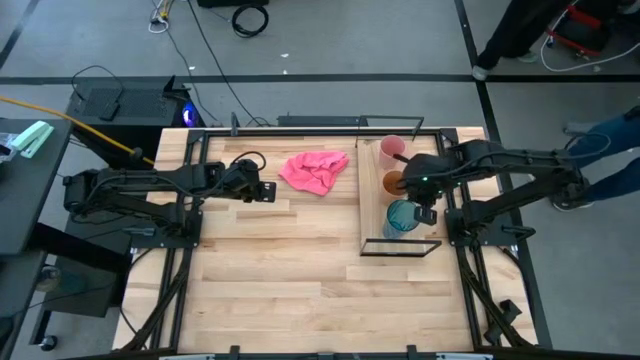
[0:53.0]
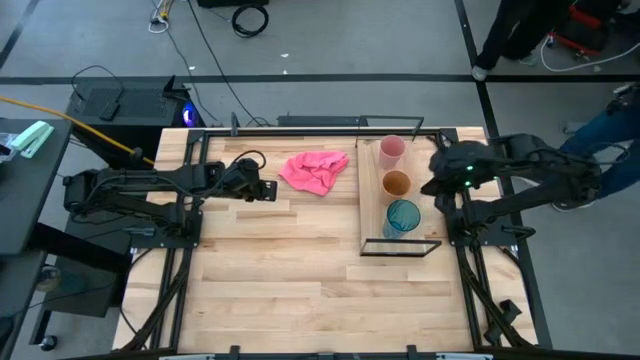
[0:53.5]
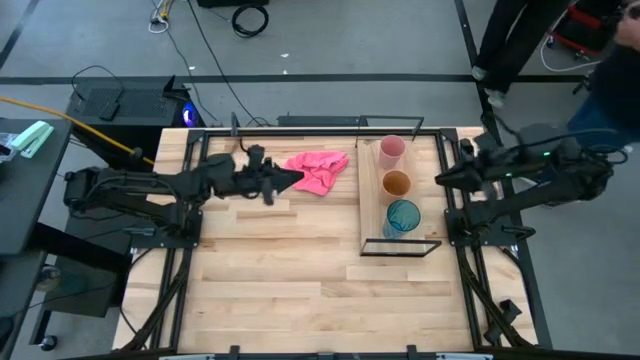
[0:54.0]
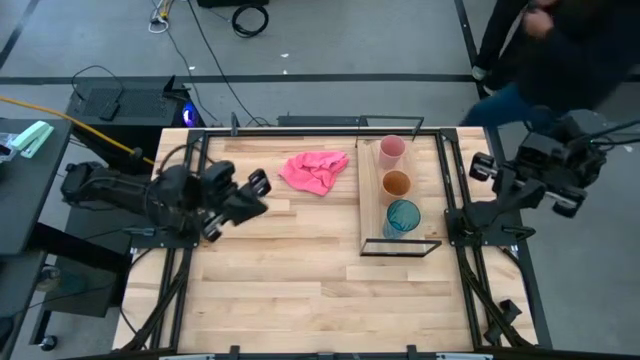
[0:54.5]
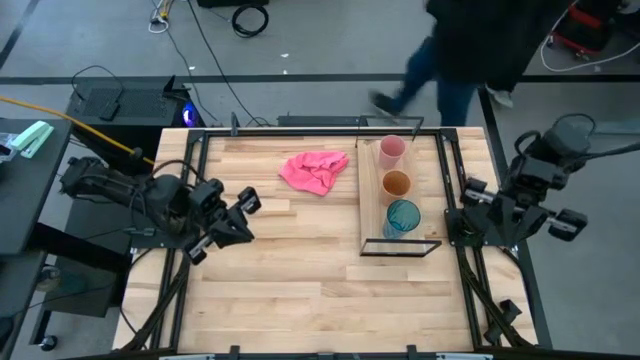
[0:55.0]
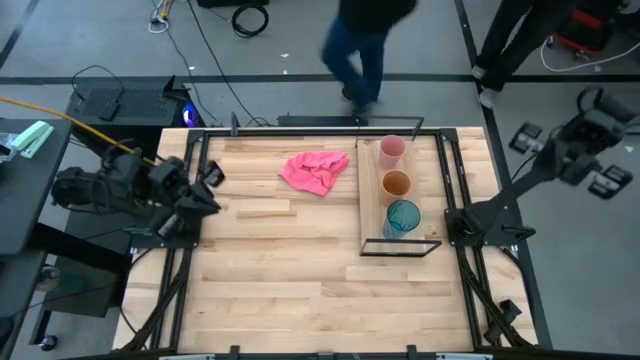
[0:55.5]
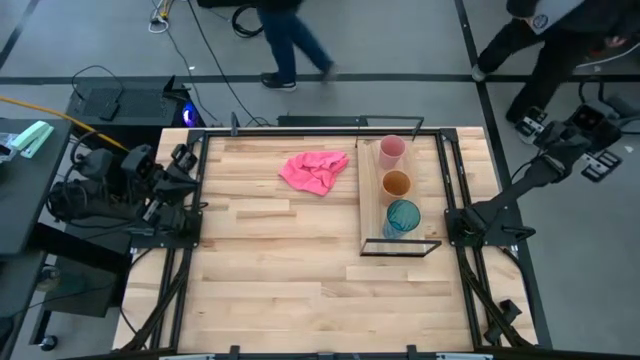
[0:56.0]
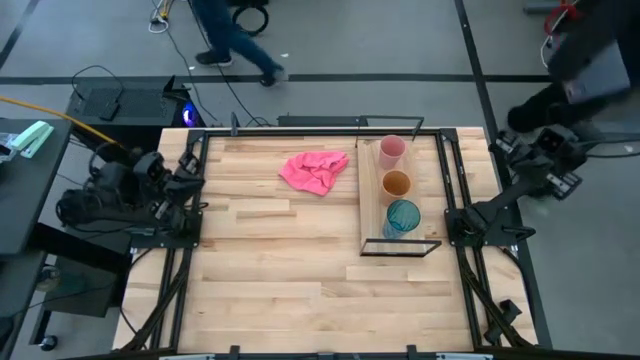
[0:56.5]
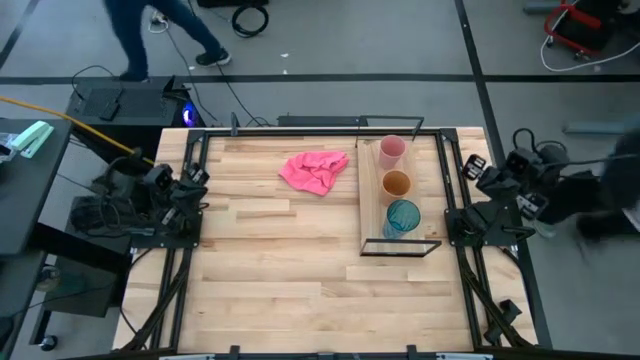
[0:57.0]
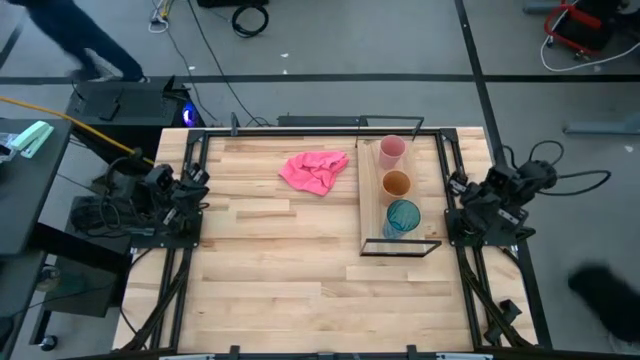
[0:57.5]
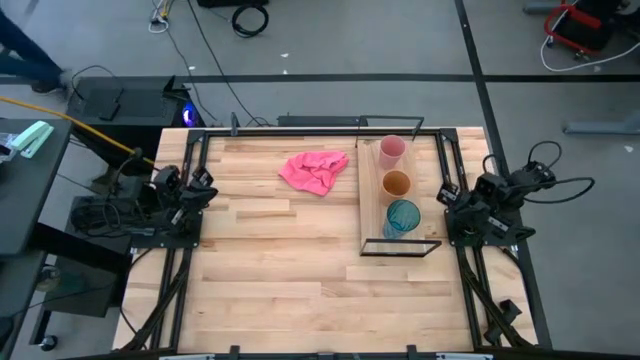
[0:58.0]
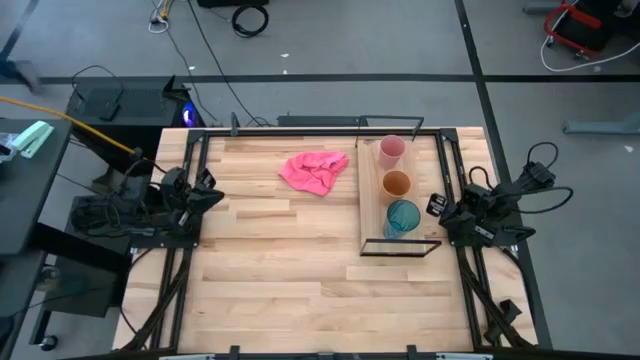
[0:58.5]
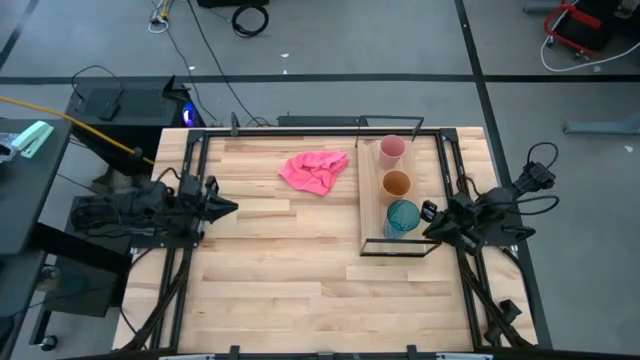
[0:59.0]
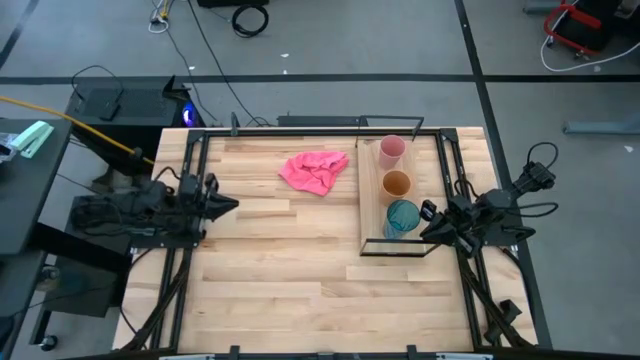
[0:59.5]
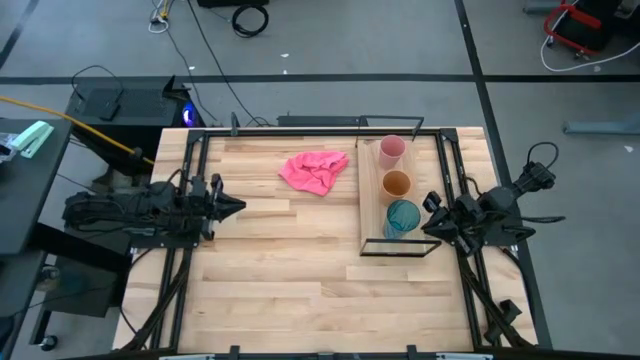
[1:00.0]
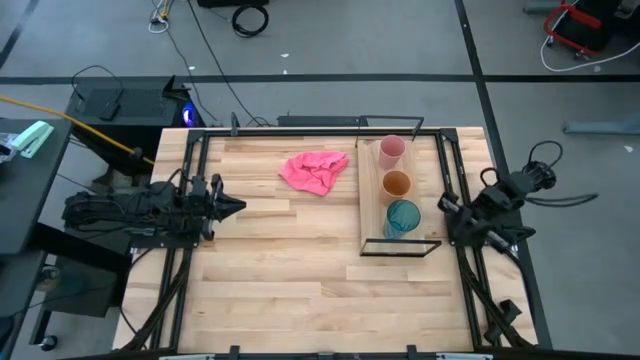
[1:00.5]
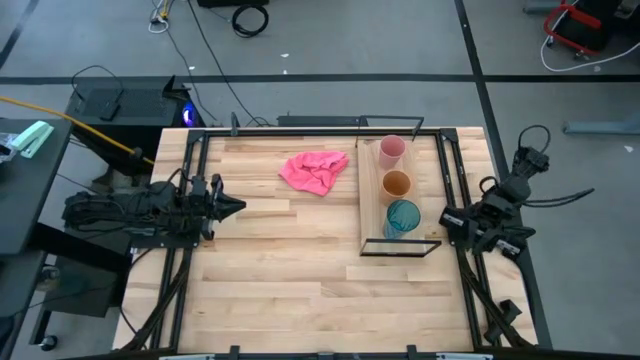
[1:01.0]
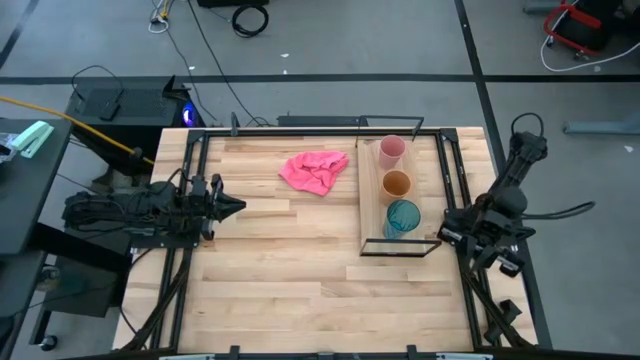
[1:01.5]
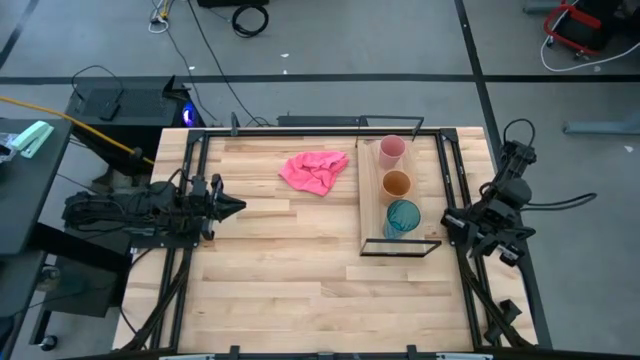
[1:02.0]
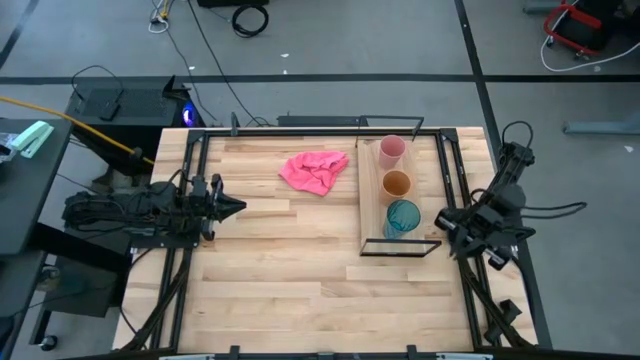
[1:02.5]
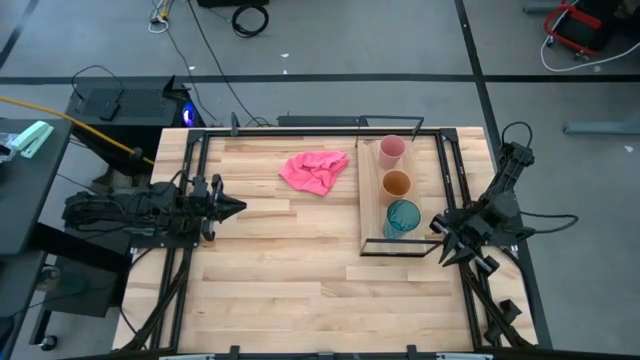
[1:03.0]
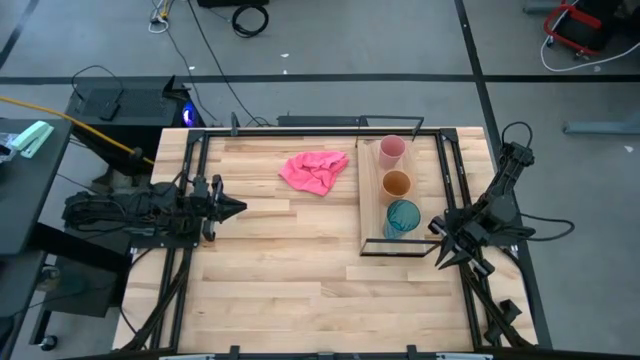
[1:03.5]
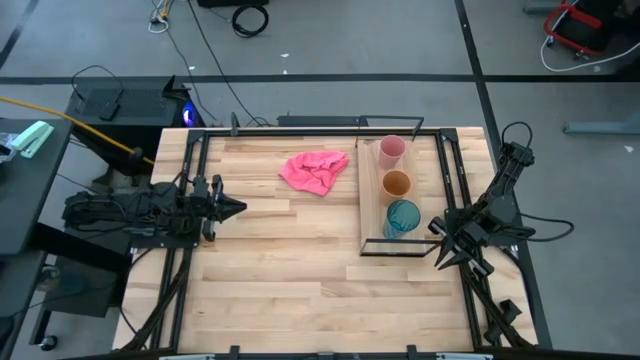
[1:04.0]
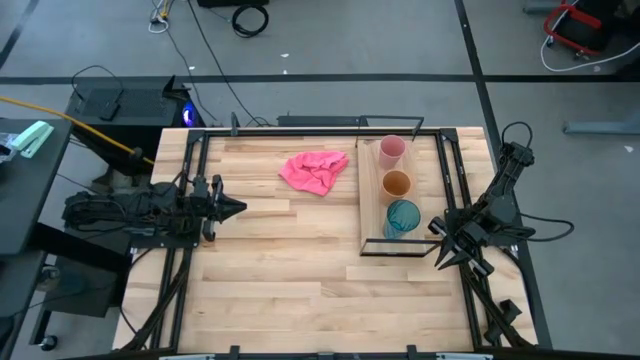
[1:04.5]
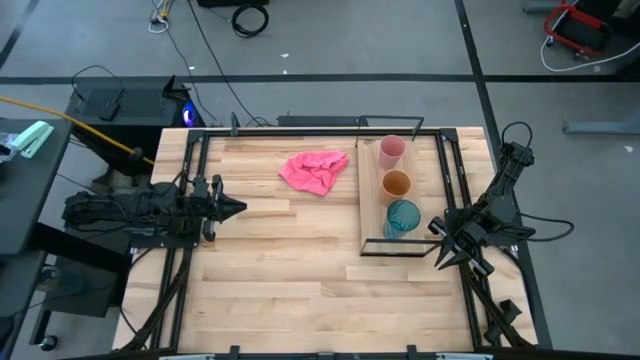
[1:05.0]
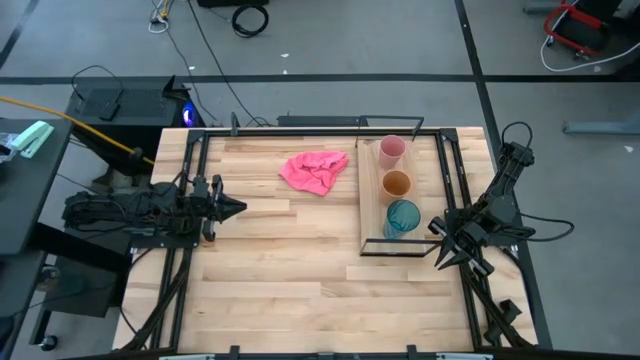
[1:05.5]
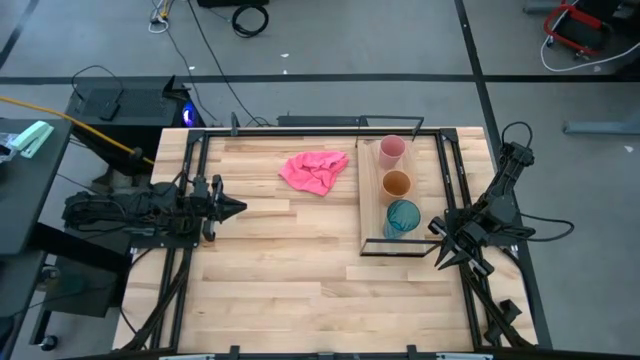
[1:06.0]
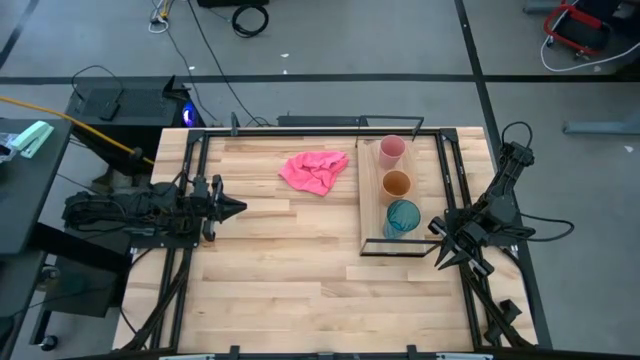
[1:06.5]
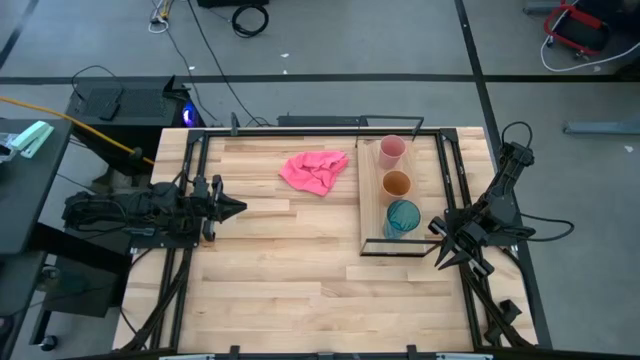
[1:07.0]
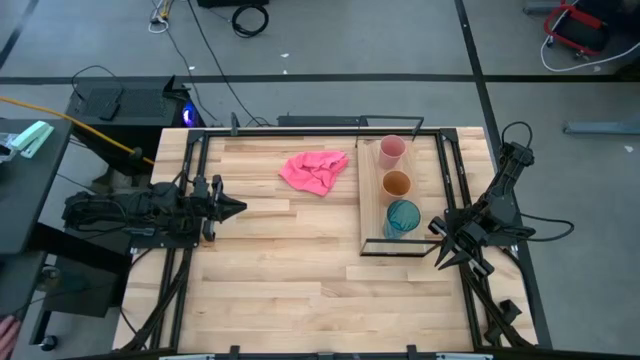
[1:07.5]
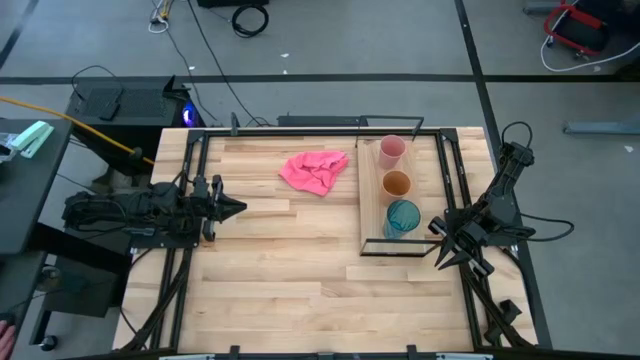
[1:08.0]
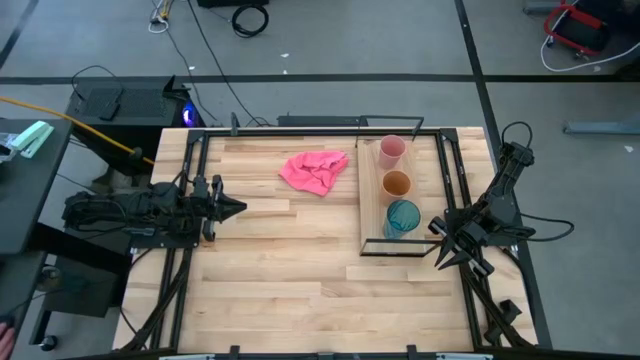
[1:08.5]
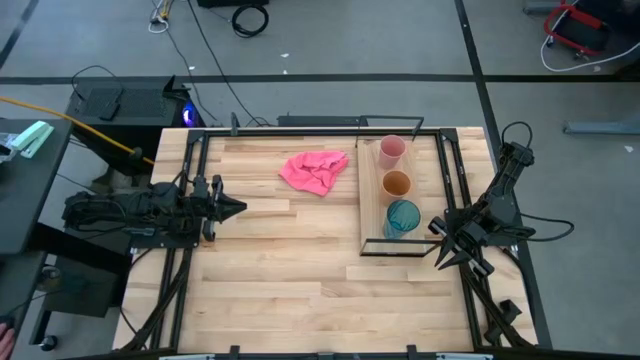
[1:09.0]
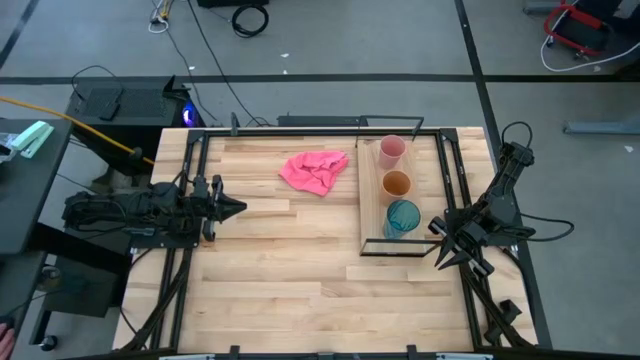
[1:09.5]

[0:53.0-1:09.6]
Task: Stack small to large cups/mugs on shelf
Return to Home Position

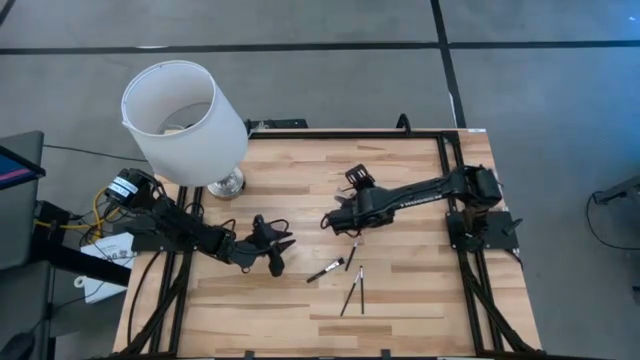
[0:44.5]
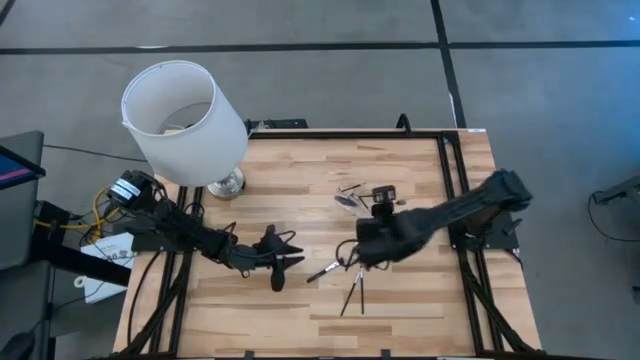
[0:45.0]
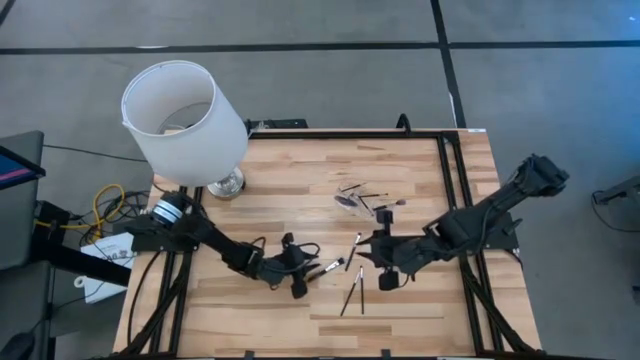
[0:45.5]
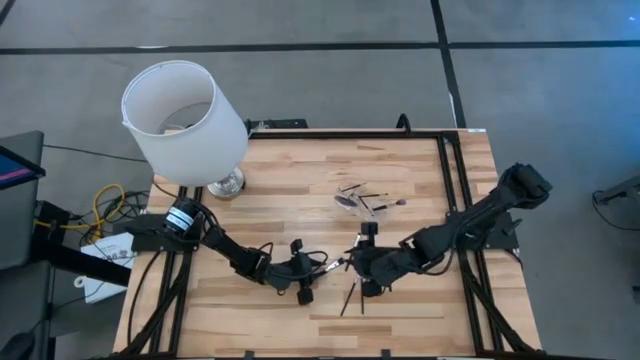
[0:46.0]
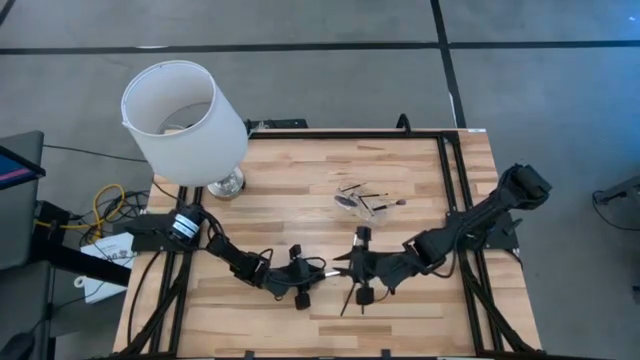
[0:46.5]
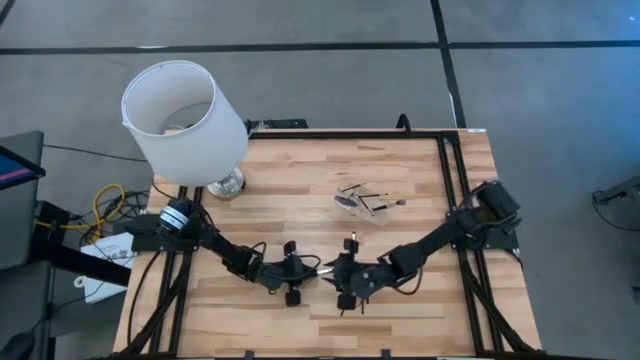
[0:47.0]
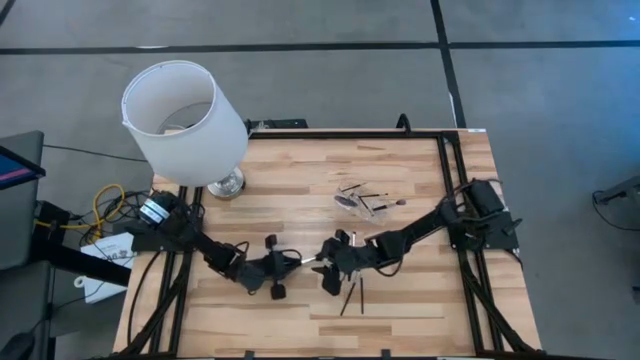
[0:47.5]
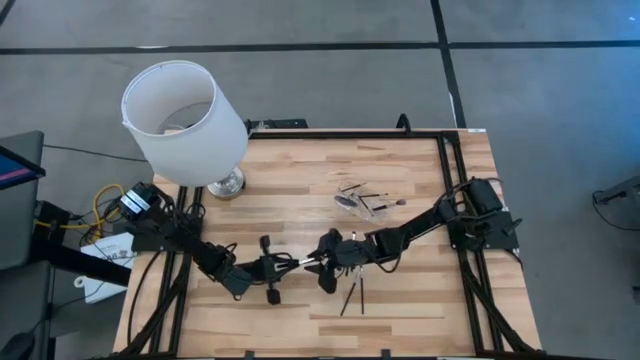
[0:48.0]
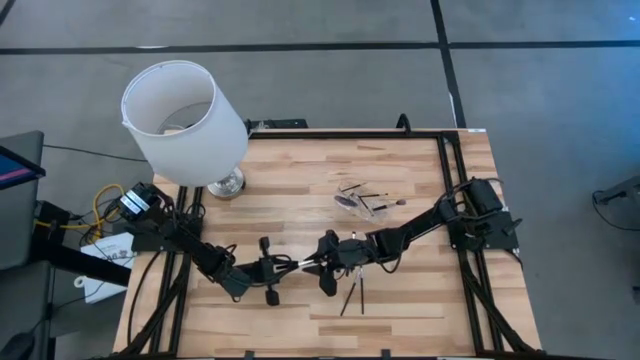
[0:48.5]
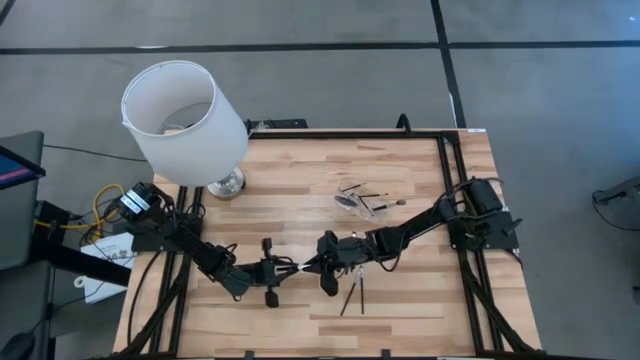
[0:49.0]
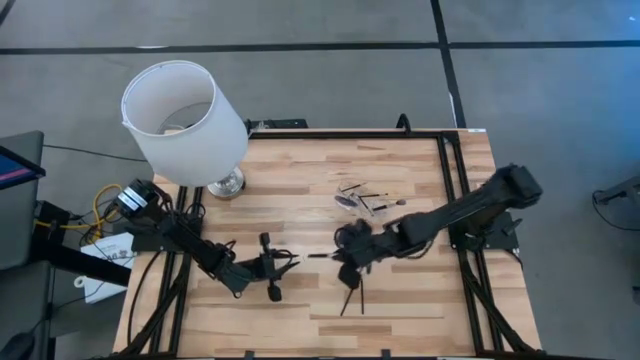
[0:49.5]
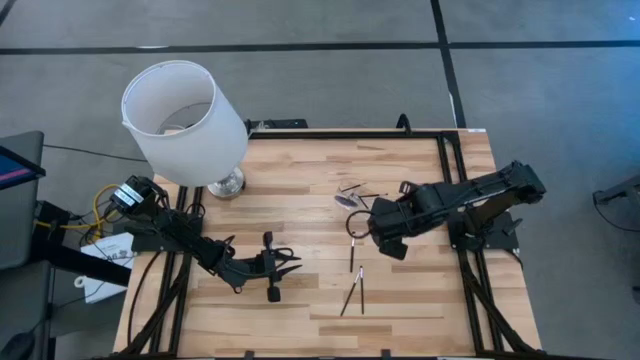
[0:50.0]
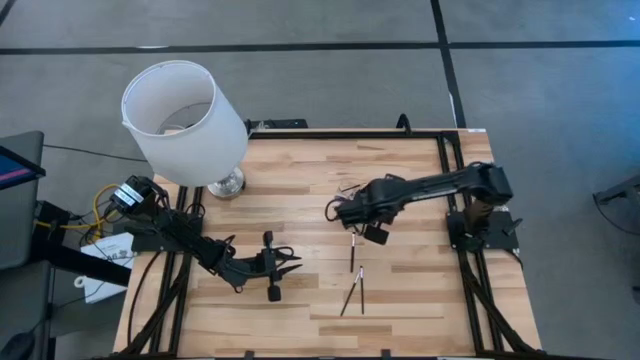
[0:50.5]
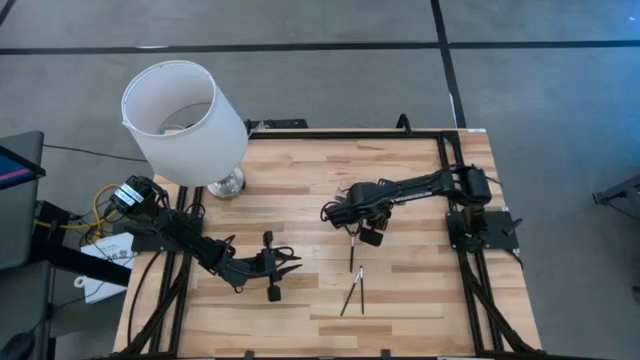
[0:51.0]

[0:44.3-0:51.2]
Task: Put items in baskets/containers
Put the black foundation brush into the transparent organizer
